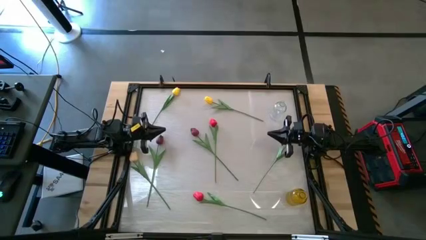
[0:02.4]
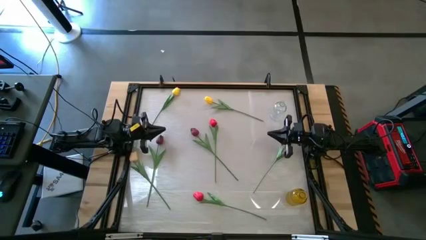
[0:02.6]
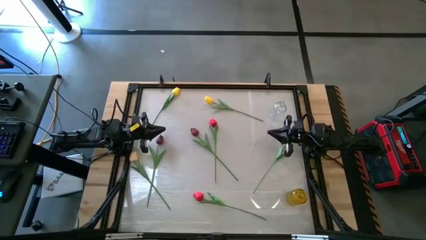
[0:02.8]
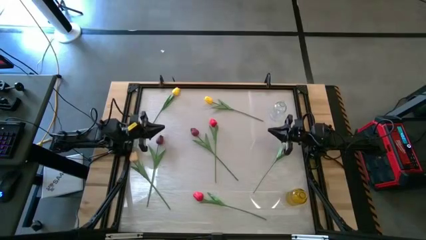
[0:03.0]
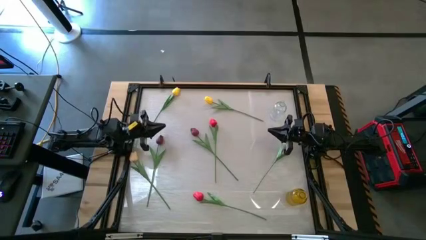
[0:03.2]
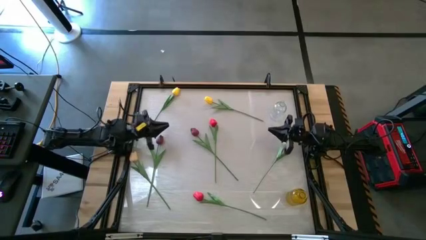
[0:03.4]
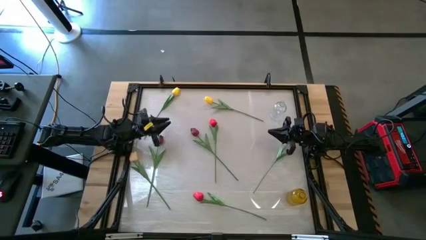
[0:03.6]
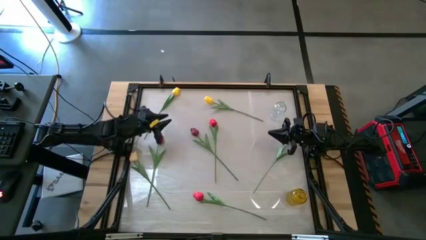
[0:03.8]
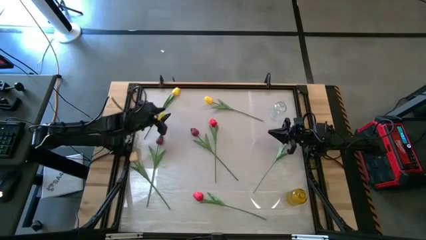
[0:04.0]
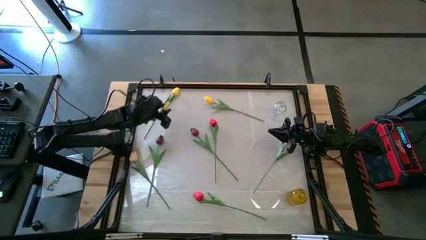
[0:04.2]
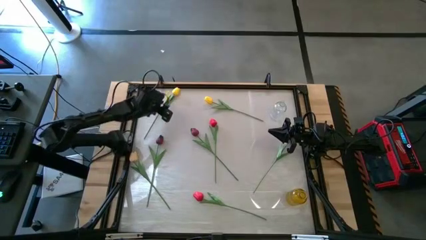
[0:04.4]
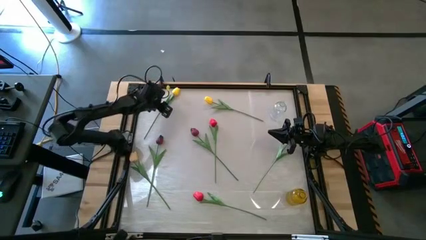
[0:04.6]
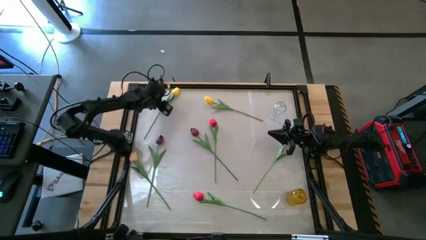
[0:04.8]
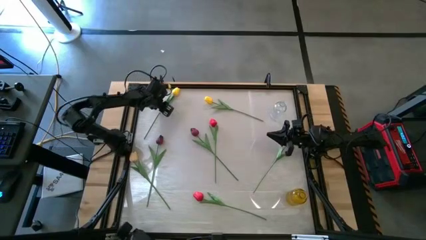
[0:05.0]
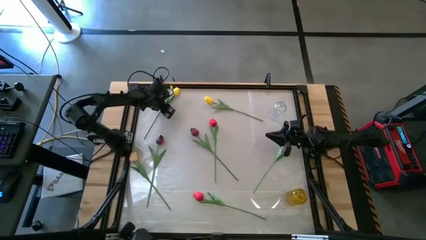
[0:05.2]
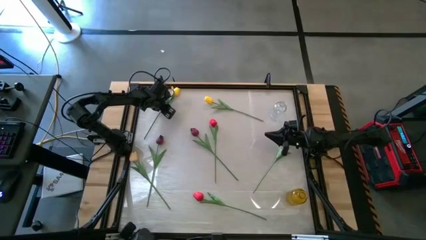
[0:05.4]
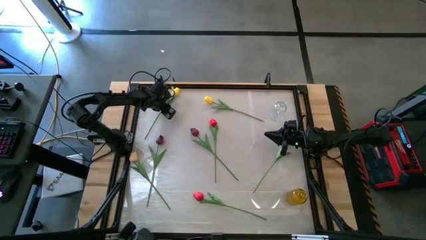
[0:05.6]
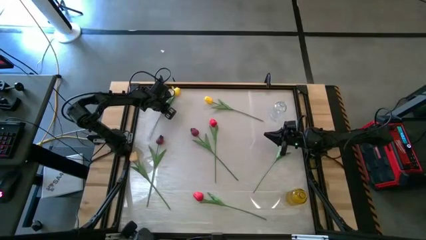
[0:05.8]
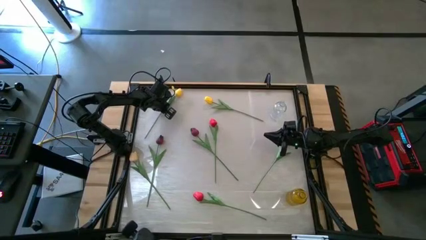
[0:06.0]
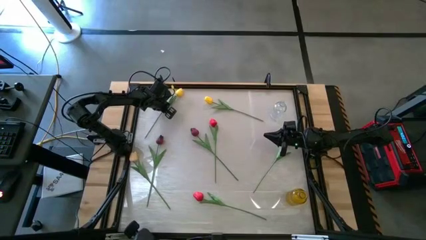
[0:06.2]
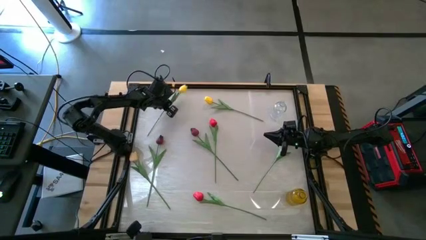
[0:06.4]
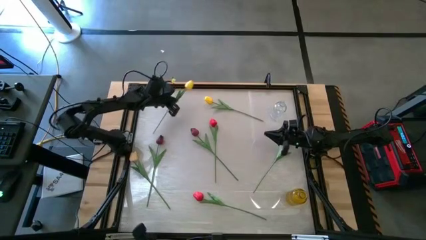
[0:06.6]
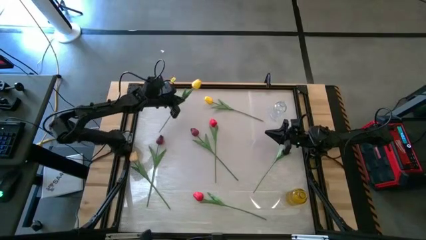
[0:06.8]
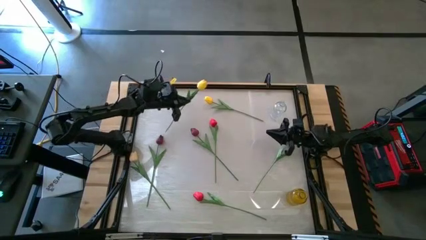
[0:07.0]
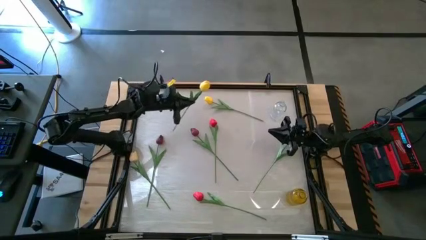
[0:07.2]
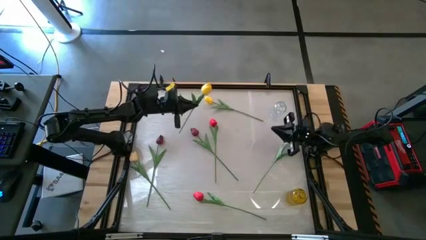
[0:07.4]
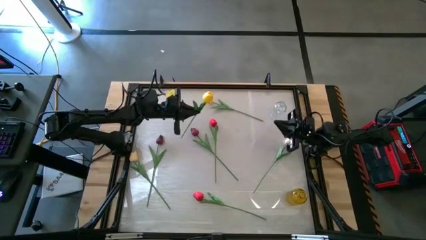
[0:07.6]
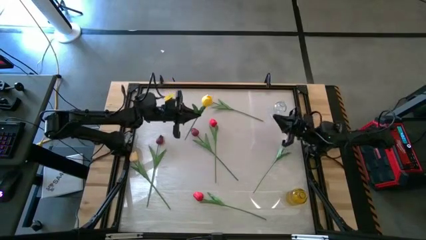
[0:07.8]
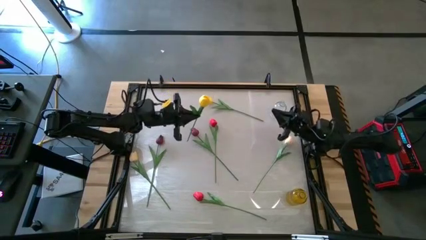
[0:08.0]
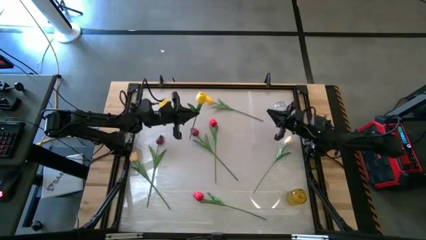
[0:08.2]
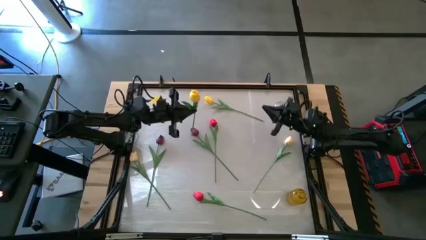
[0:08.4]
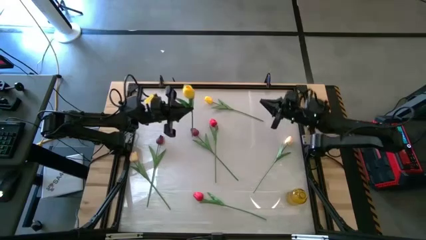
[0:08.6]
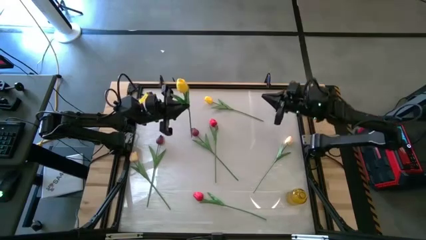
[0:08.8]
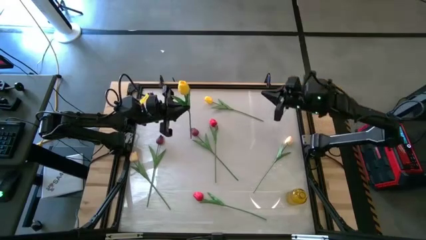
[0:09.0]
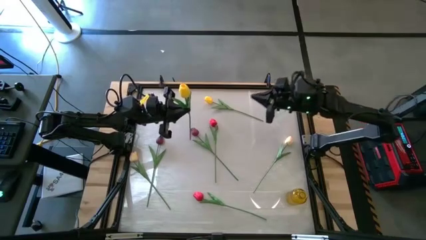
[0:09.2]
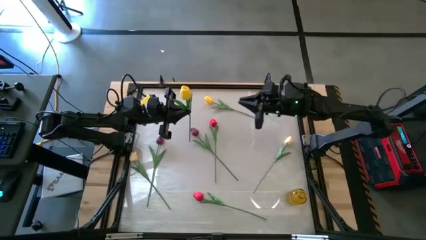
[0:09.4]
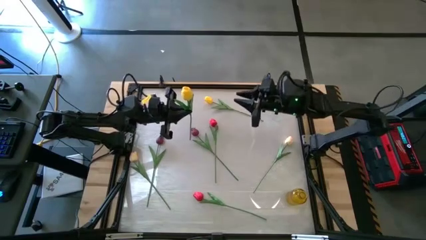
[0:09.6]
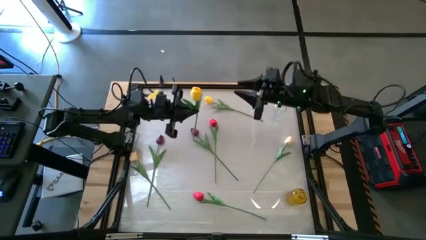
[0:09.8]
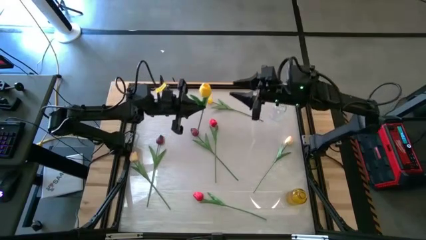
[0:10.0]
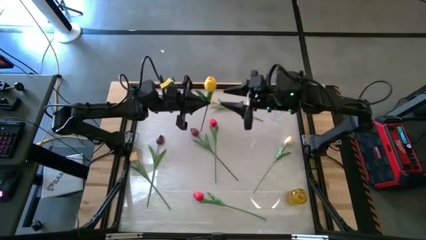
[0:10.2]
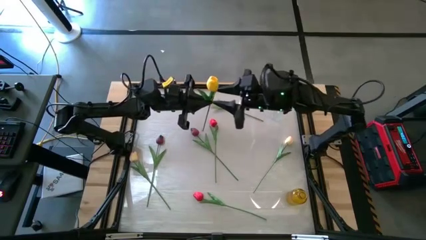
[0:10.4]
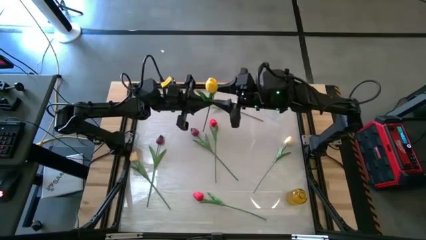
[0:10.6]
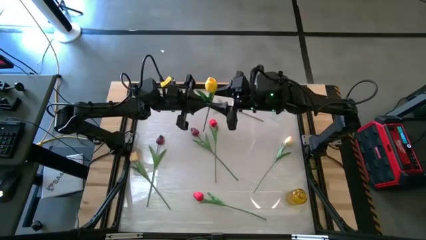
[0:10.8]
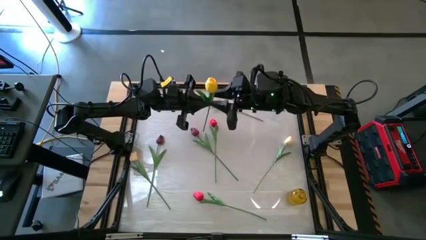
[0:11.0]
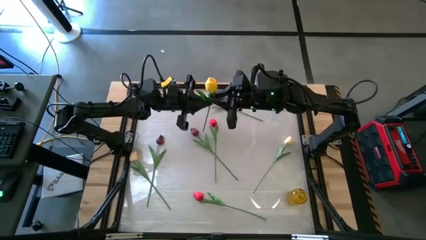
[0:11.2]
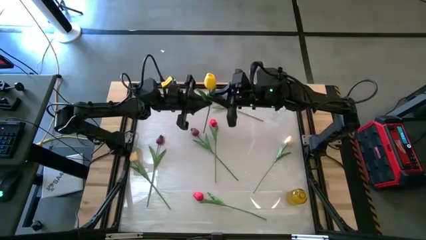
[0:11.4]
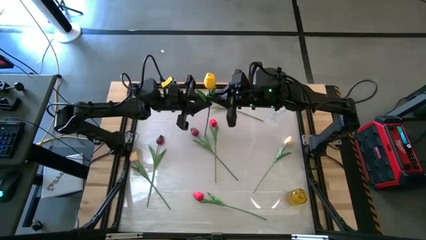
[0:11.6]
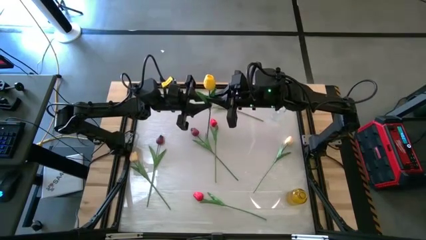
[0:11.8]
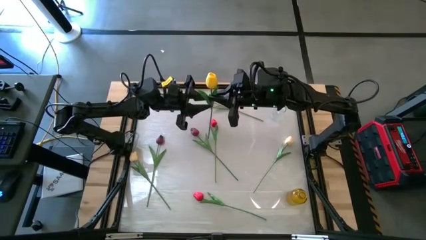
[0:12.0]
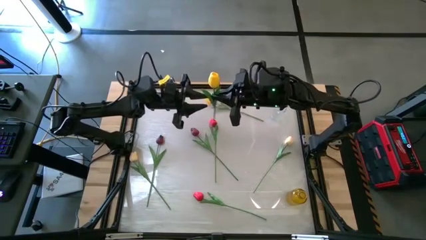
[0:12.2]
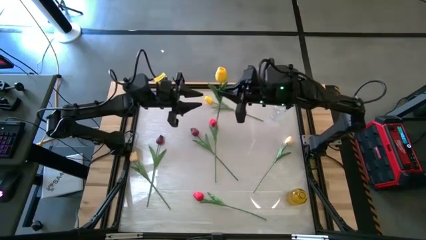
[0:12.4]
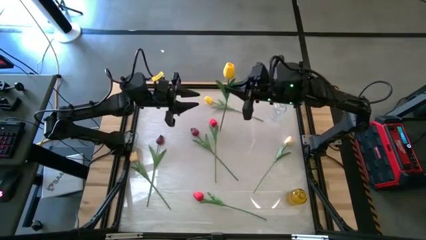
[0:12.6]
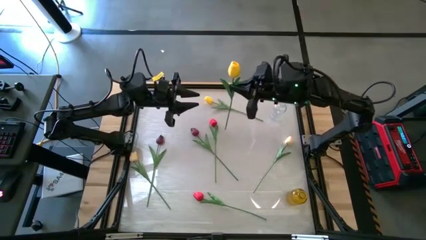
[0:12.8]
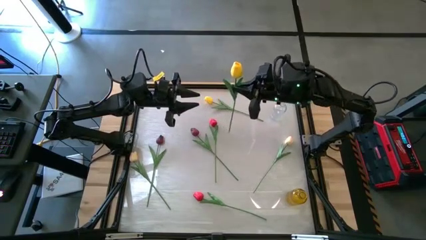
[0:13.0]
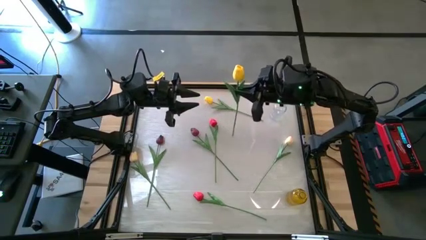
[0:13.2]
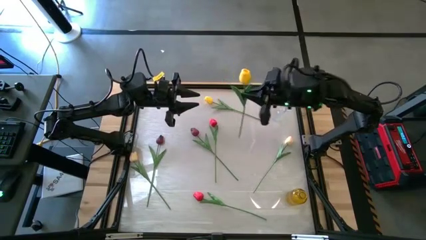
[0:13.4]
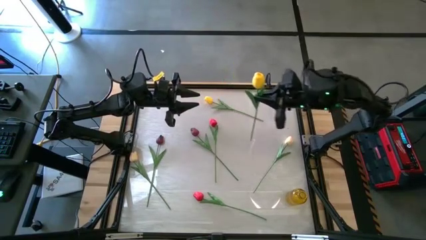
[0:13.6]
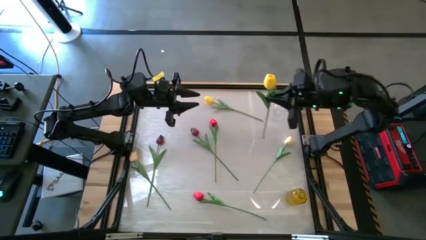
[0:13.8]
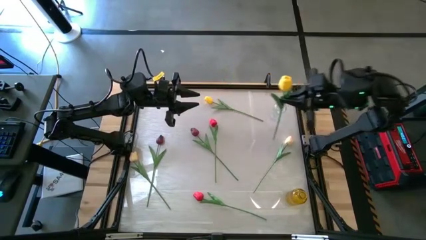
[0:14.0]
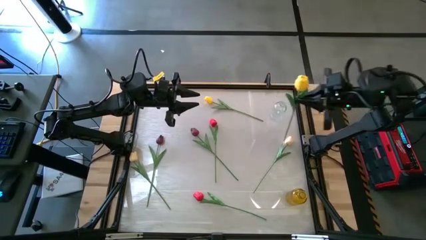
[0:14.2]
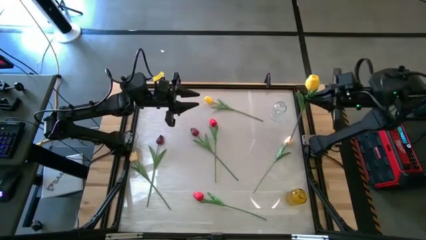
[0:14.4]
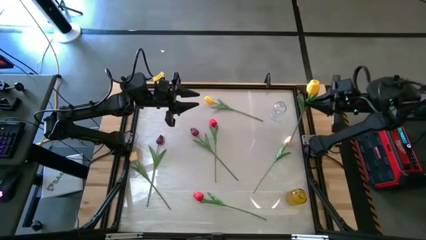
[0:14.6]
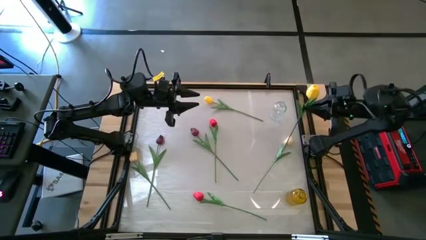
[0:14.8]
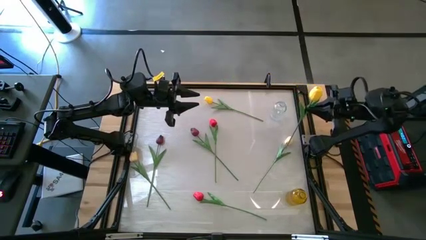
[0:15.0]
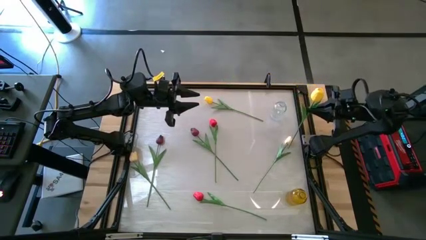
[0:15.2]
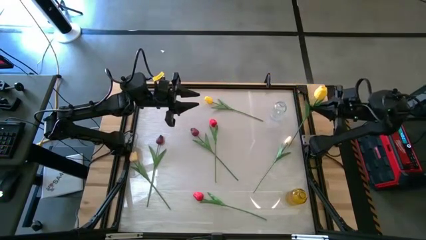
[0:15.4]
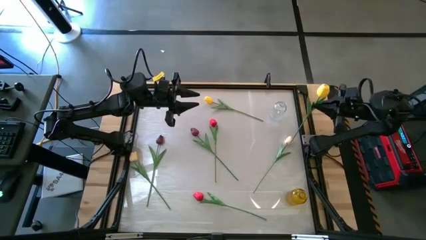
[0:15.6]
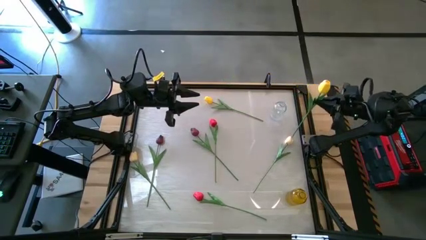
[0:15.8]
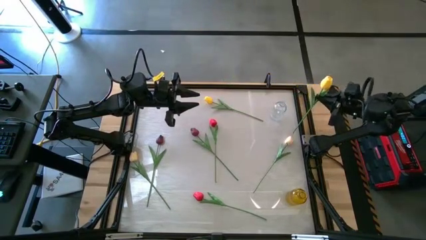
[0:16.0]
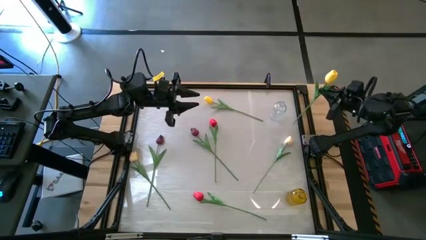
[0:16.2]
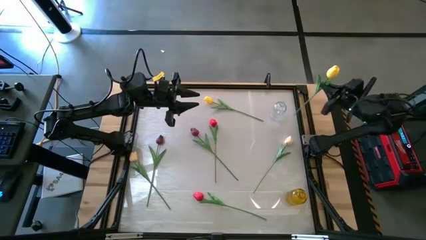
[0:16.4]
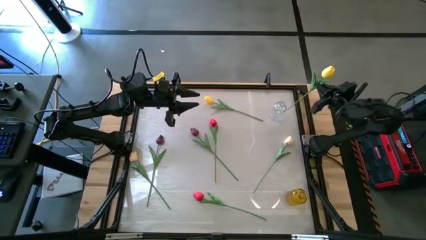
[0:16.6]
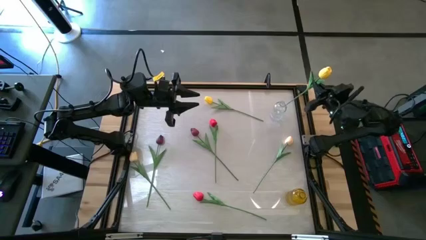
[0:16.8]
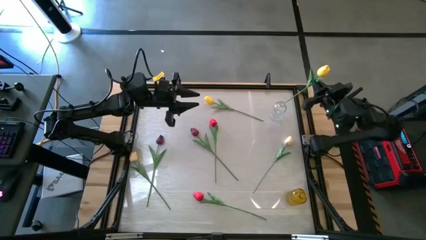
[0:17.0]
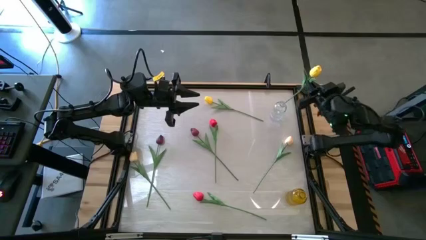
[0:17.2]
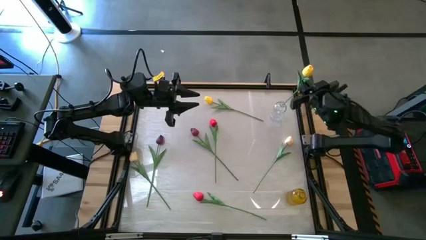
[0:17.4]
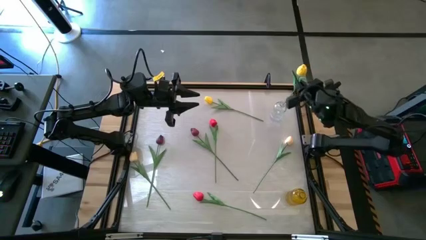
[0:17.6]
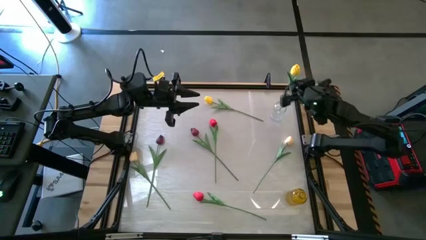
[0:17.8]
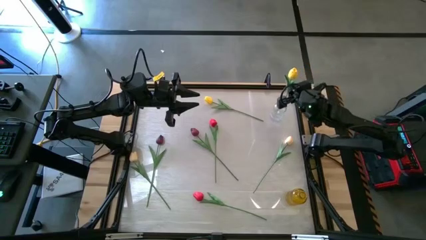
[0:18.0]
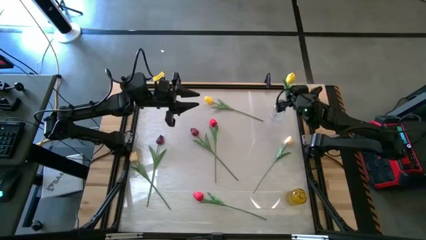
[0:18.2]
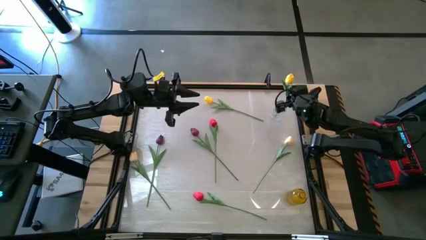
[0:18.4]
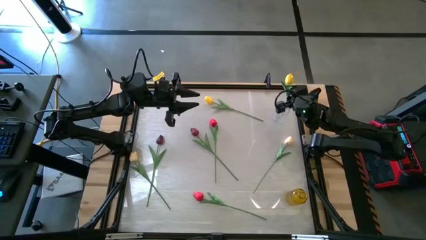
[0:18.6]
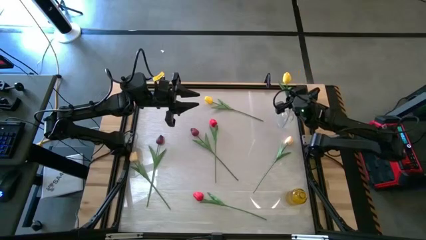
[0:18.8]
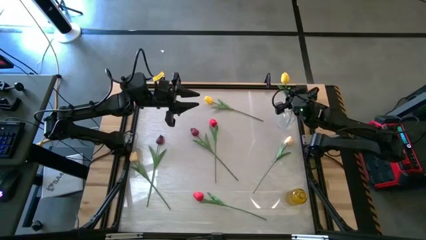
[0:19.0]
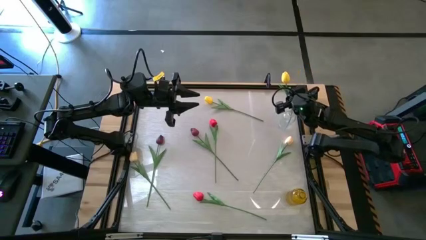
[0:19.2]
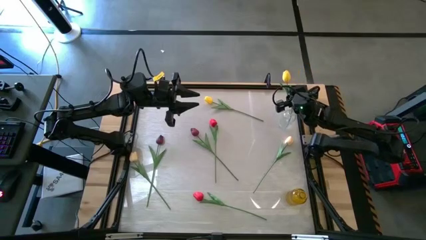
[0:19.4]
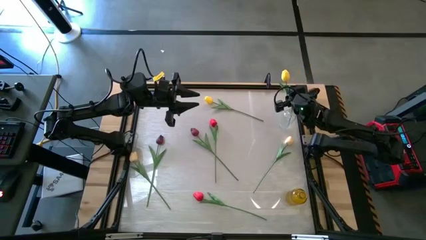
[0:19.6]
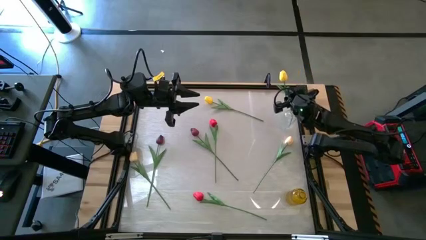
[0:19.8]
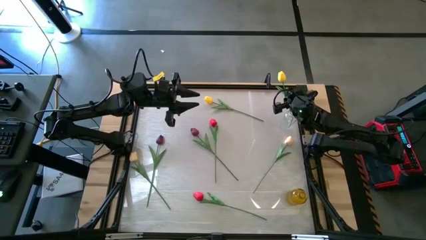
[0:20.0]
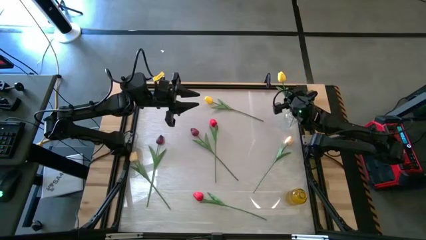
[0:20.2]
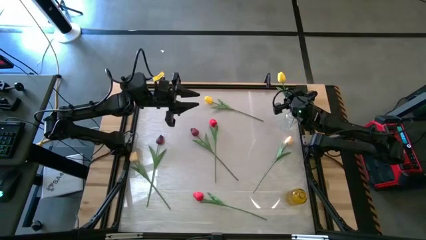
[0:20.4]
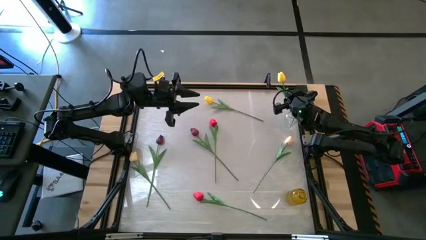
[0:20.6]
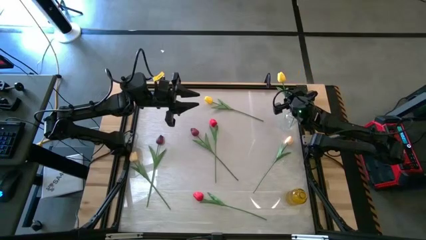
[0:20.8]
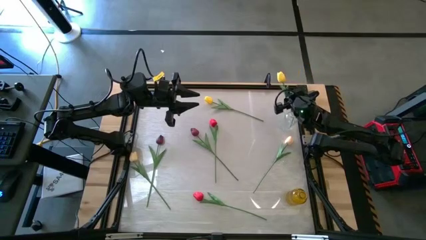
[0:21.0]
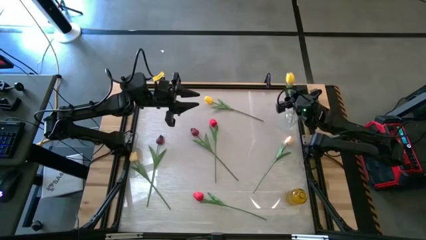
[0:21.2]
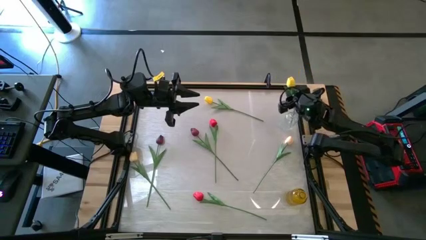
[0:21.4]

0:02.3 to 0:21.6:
Task: Sort flowers into vase by color
Put the left yellow tulip into the transparent vase
